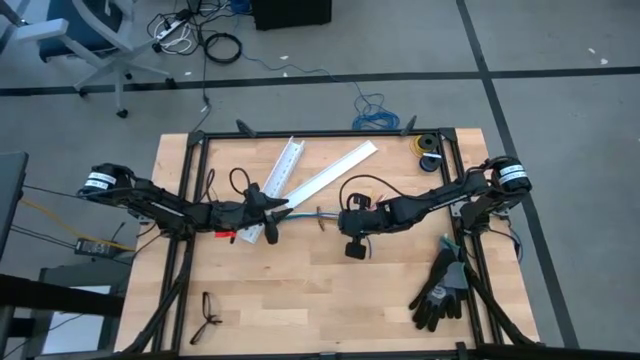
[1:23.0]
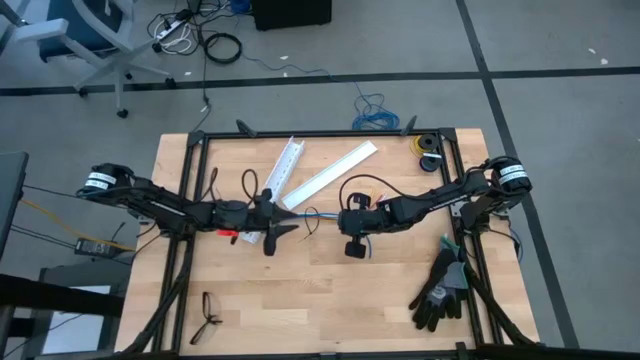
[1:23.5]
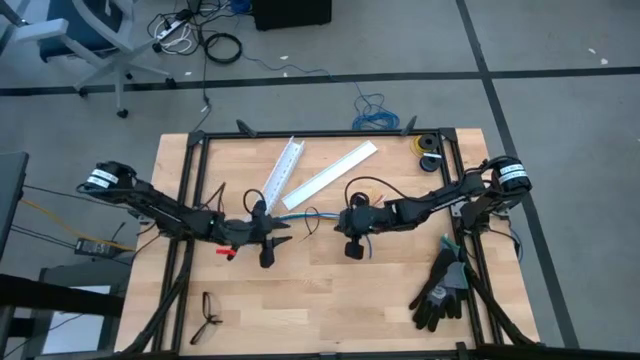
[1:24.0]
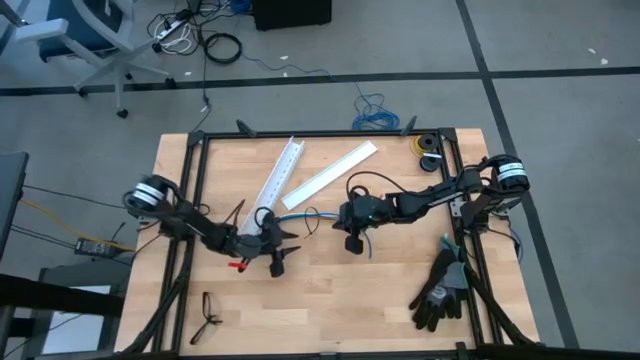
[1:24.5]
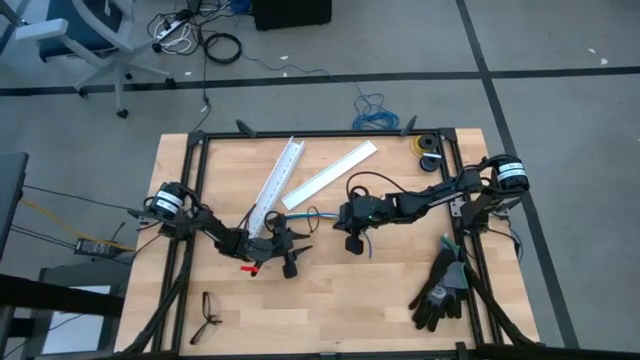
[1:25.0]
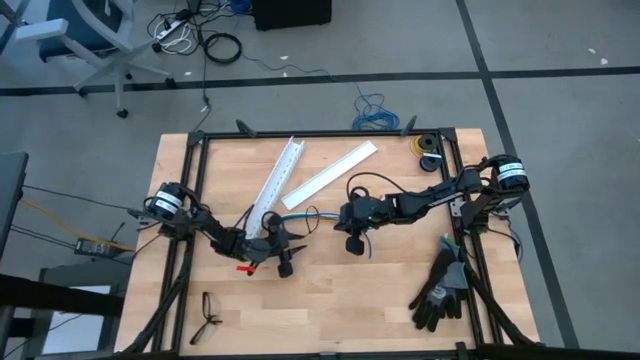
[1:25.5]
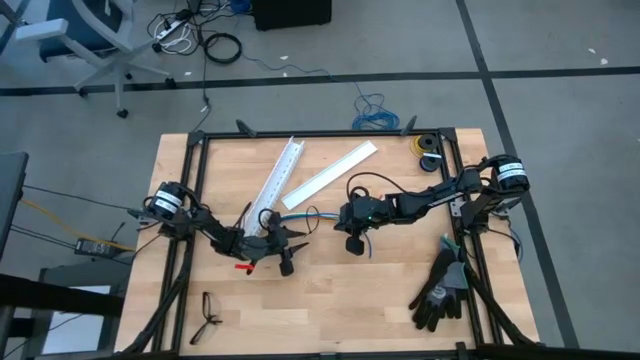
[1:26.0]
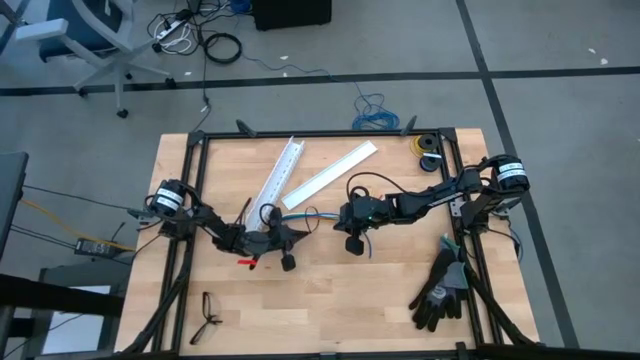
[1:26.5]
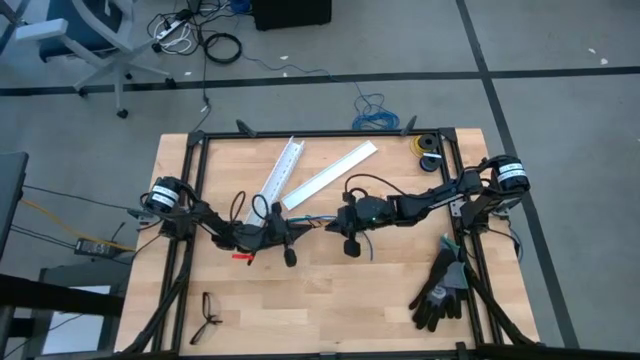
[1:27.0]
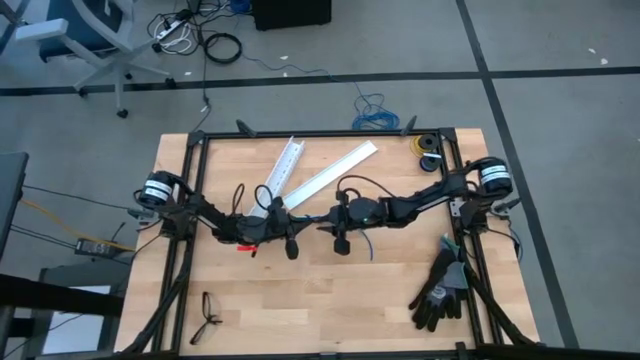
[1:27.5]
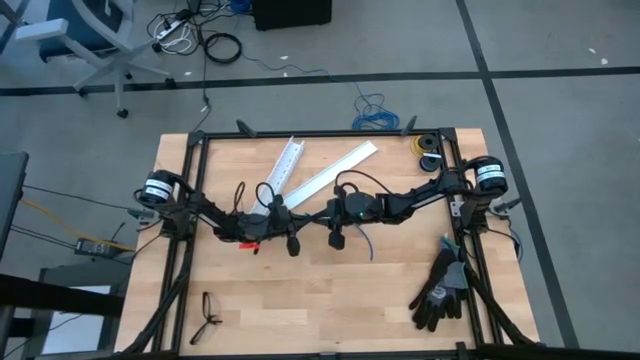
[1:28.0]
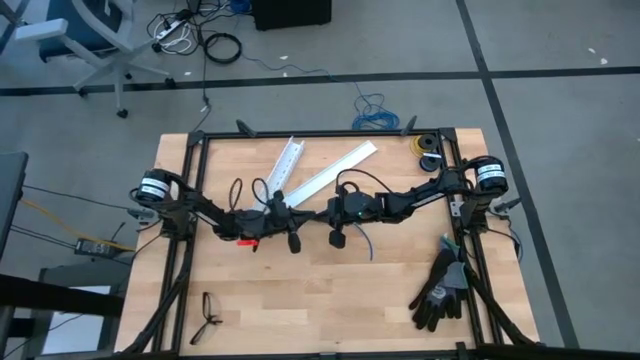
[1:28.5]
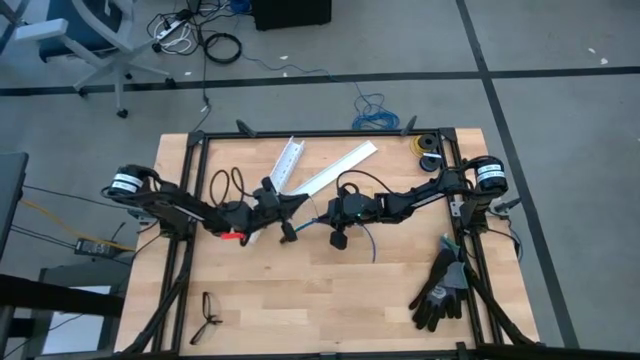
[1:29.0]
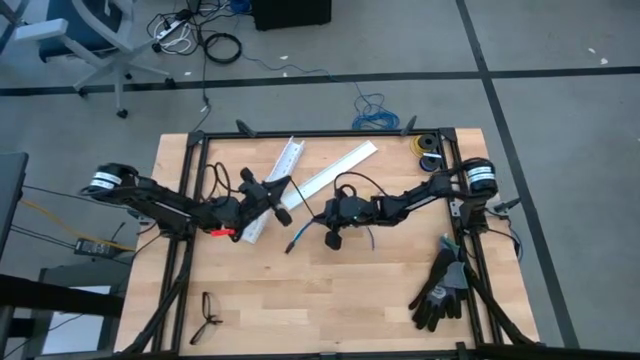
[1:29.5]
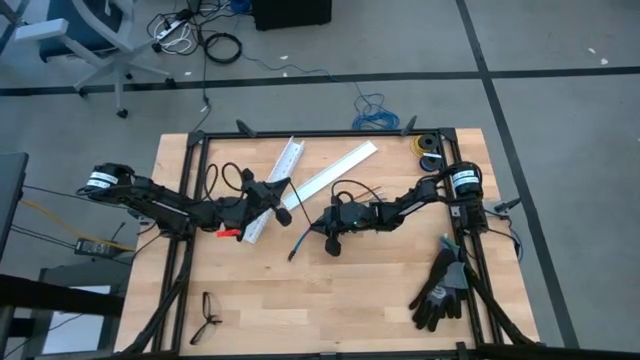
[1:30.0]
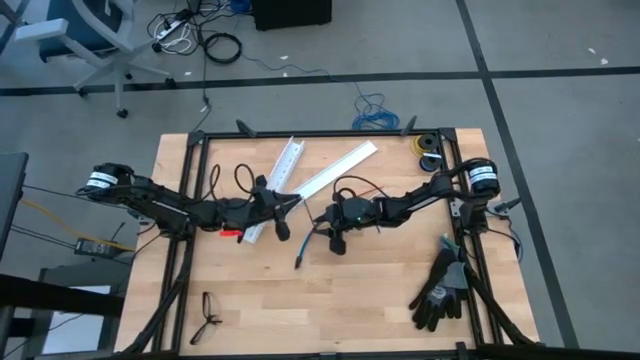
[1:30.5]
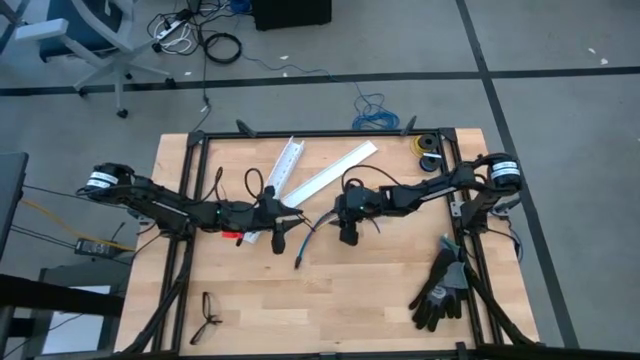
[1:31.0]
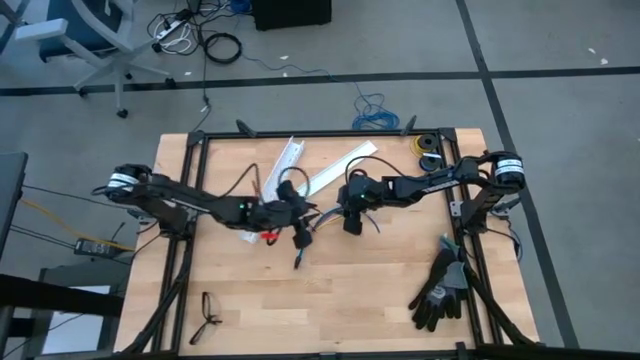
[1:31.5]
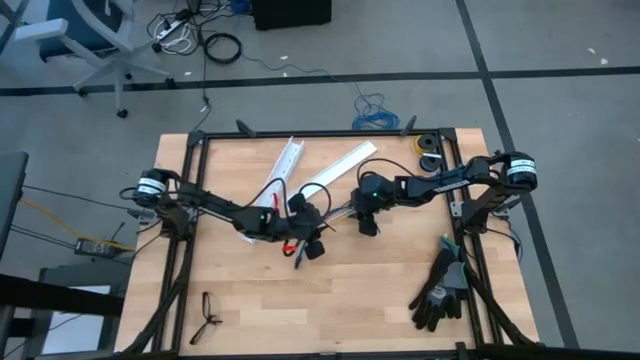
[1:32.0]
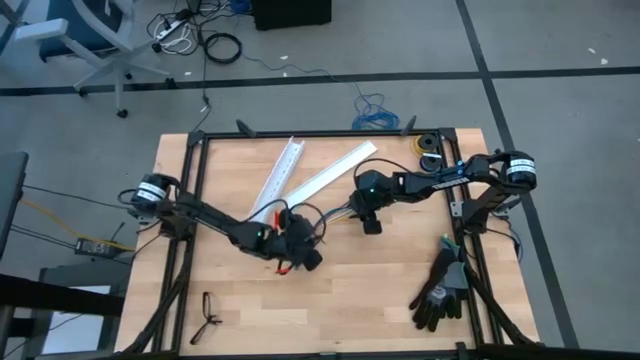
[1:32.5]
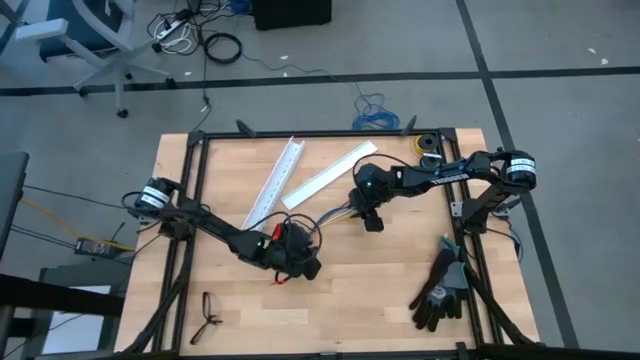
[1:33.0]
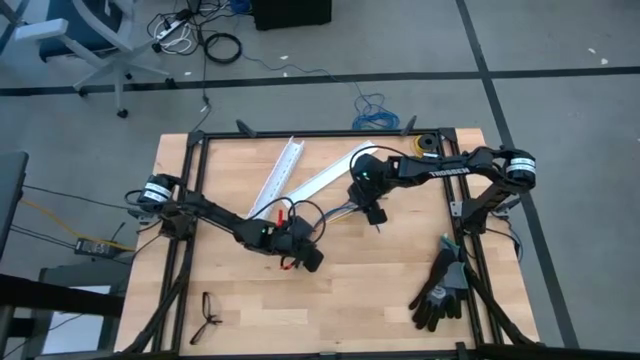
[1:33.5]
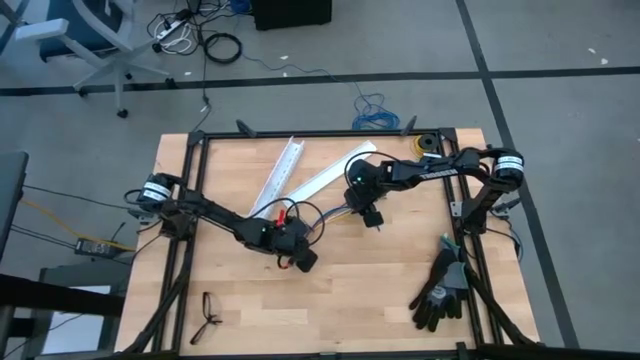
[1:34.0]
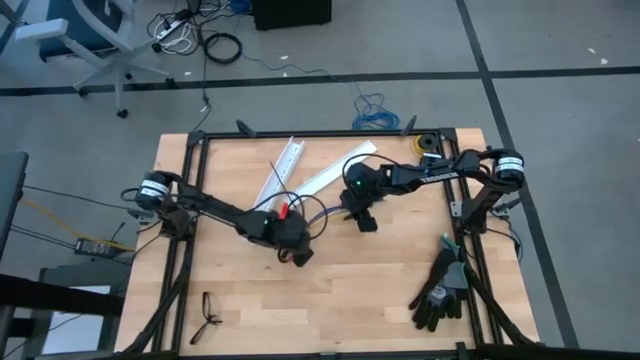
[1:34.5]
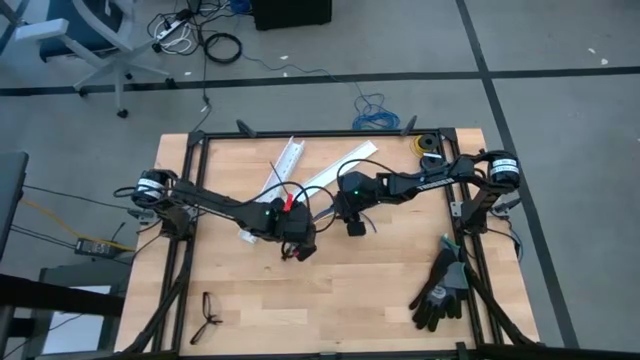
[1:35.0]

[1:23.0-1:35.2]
Task: Ziptie cables
Wrap the cable wires with the black zip tie

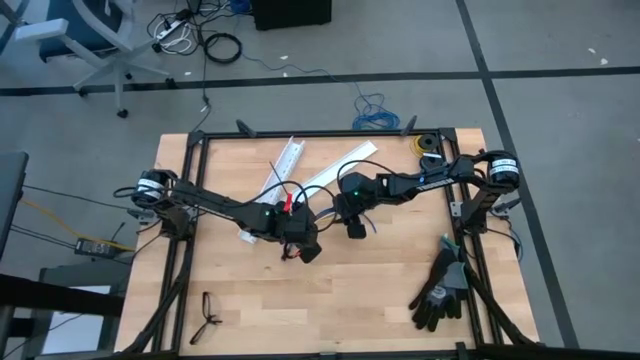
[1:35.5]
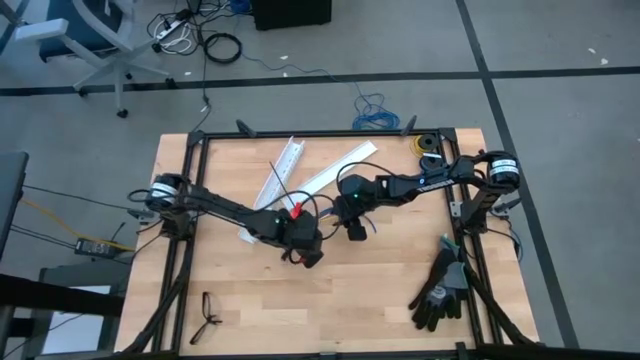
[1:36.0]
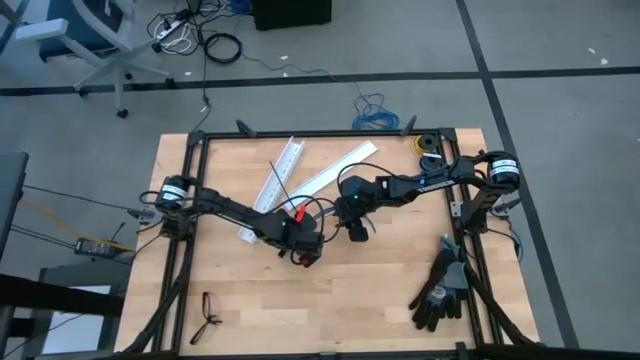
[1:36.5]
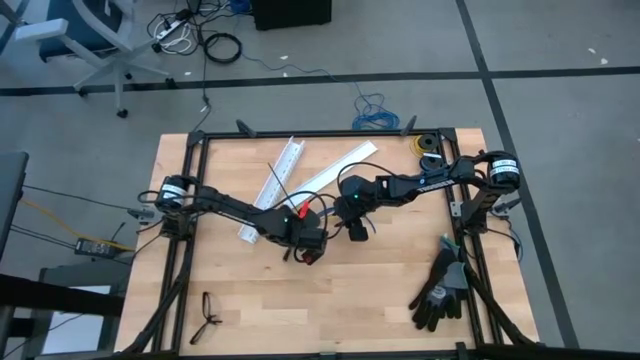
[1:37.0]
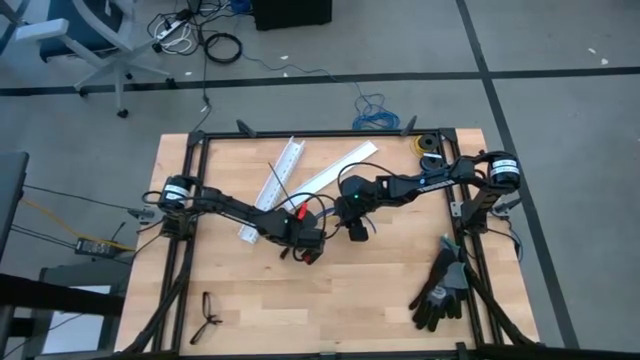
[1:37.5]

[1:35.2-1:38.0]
Put the ziptied cable wires into the white cable duct

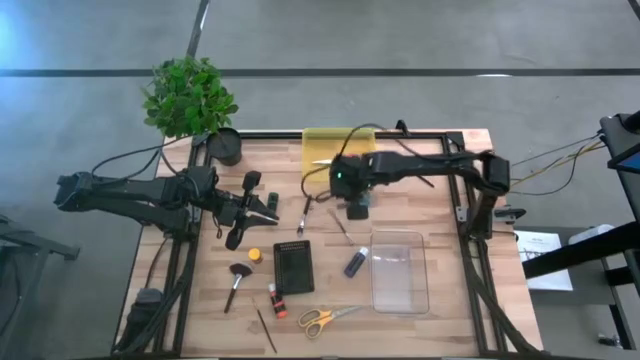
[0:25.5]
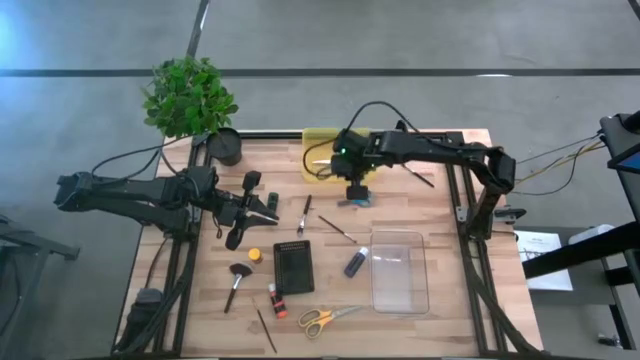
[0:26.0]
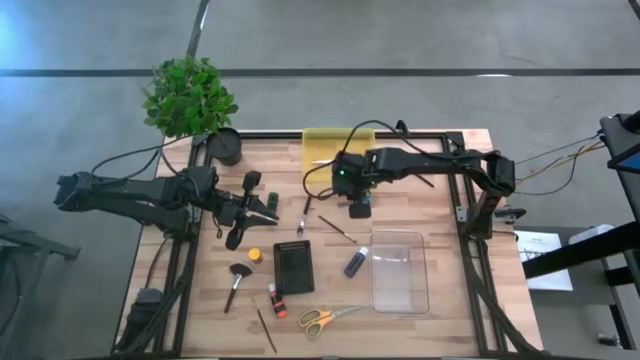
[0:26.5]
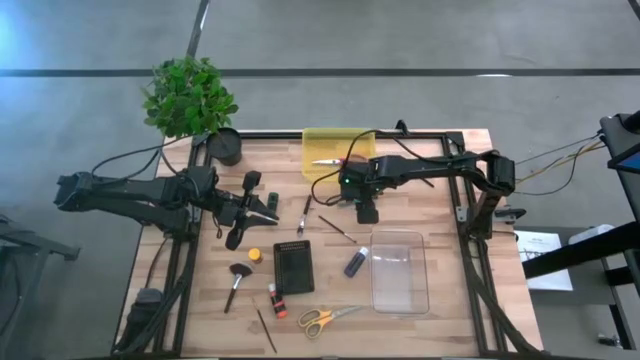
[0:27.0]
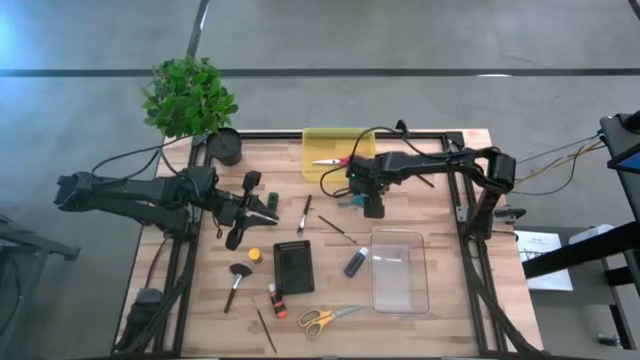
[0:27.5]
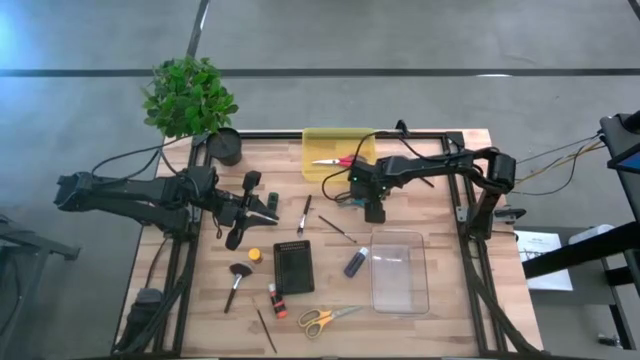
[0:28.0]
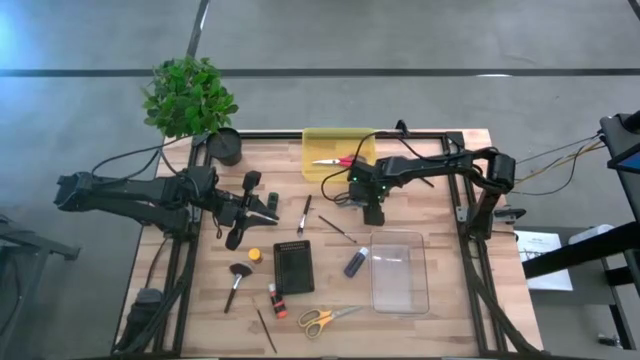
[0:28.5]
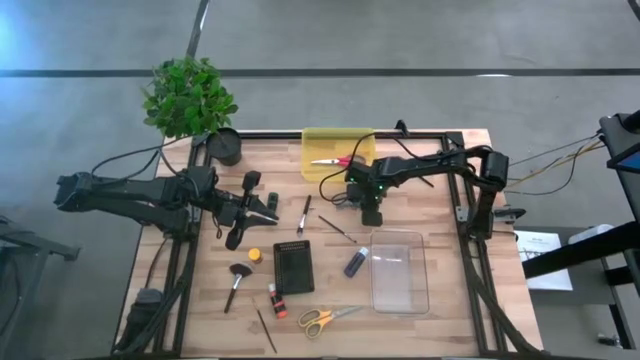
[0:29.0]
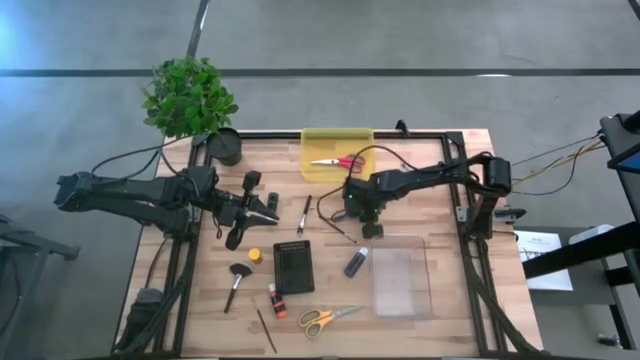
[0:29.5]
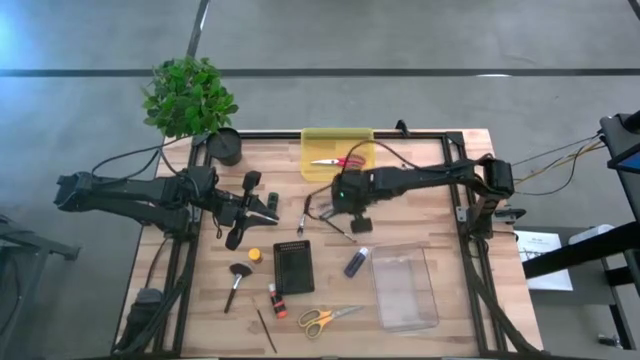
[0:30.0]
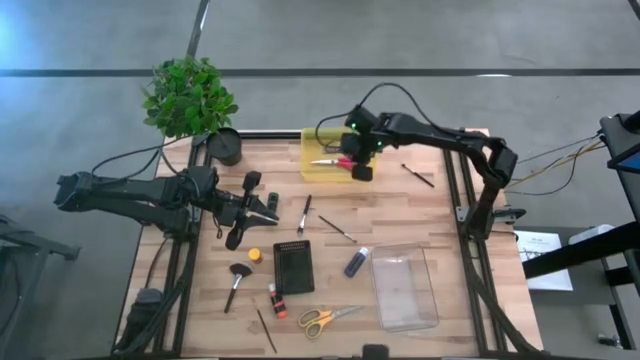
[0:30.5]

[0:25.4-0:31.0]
Task: Pick & Place Paint Supplies
Put the blue scissors into the yellow bin

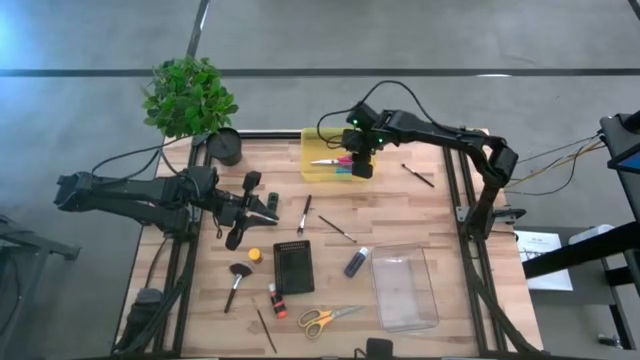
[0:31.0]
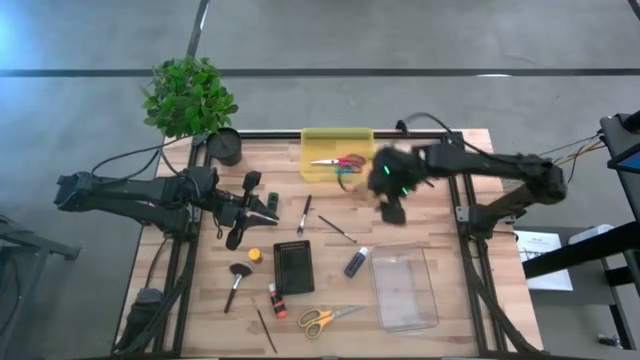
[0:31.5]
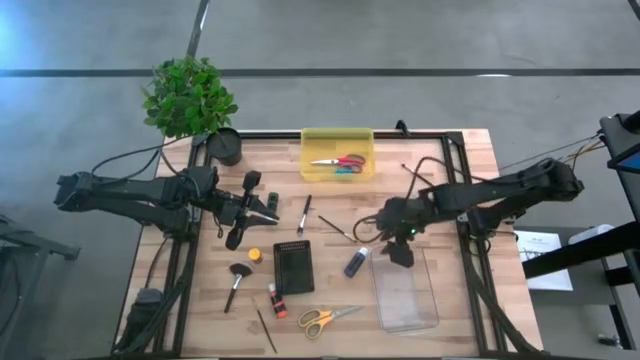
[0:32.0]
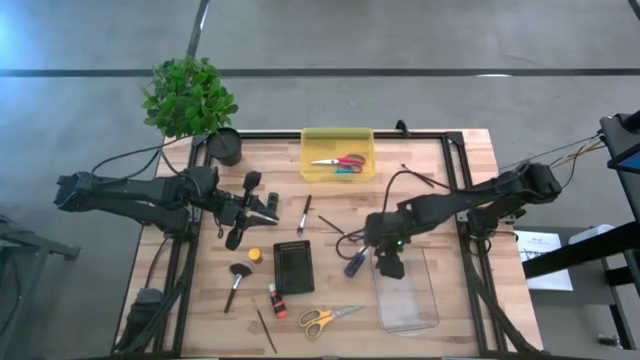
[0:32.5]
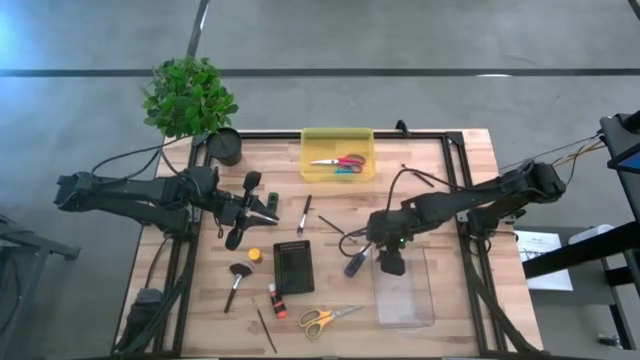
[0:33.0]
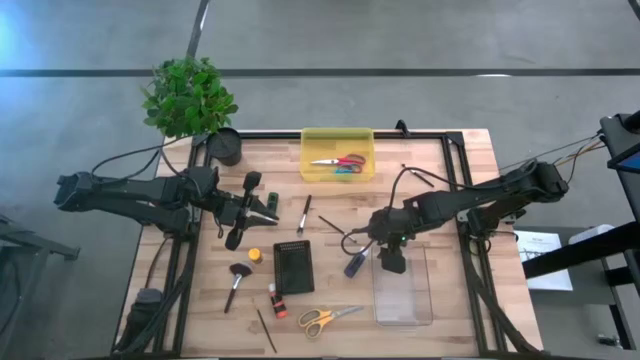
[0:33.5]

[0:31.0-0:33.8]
Adjust the transparent bin
